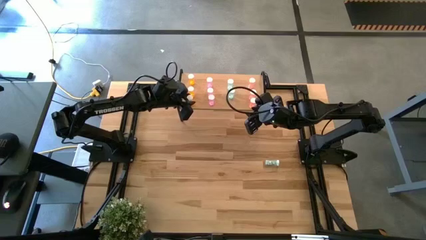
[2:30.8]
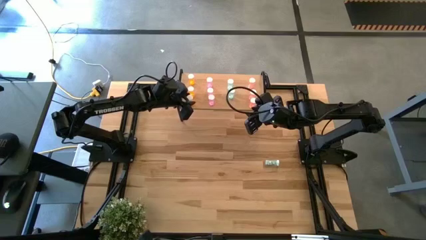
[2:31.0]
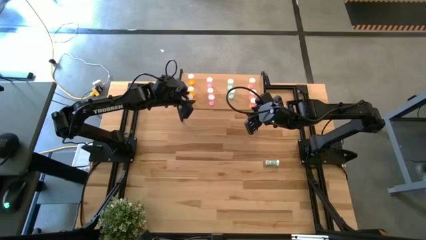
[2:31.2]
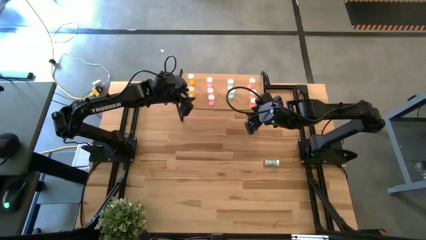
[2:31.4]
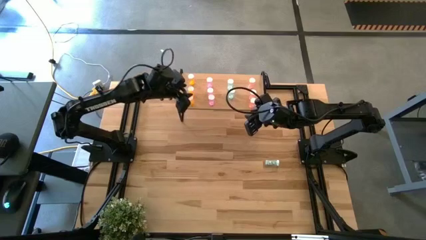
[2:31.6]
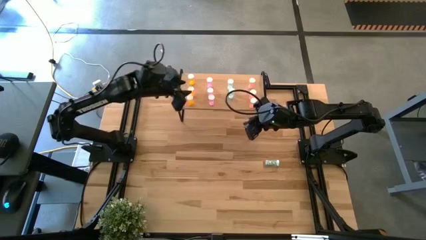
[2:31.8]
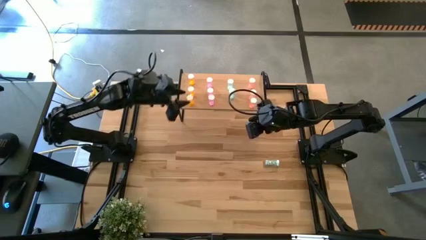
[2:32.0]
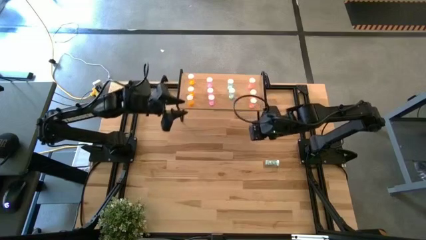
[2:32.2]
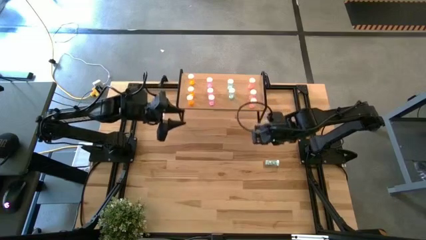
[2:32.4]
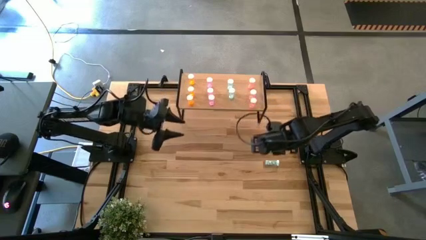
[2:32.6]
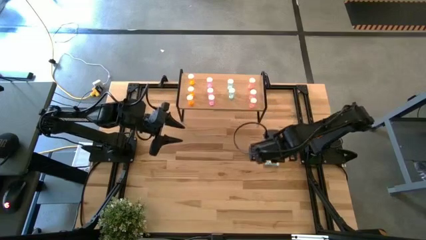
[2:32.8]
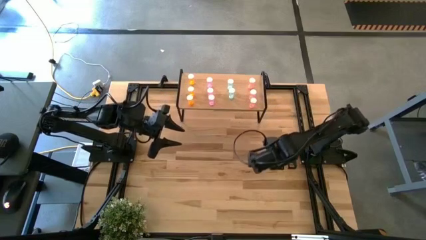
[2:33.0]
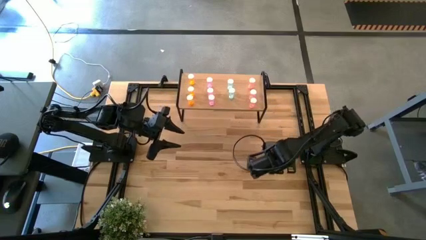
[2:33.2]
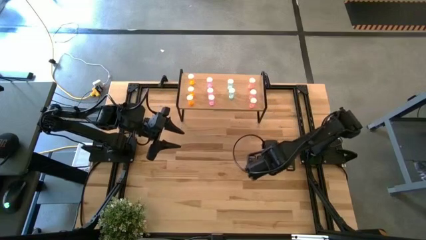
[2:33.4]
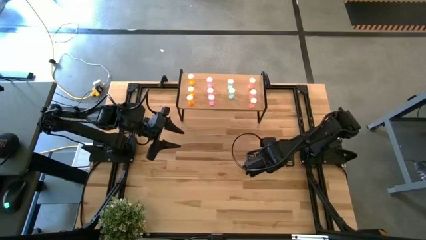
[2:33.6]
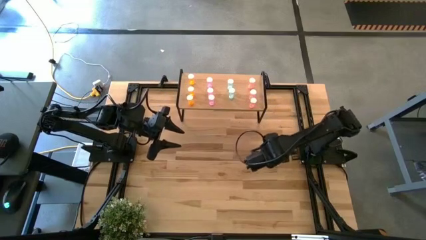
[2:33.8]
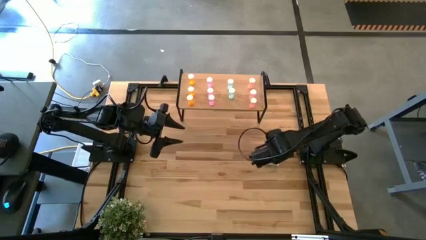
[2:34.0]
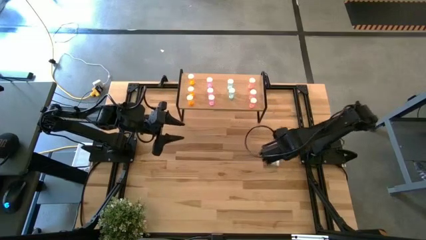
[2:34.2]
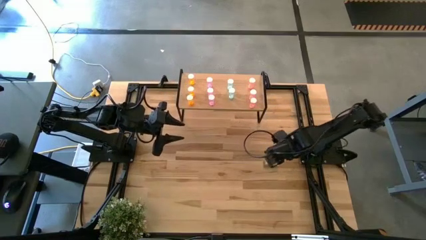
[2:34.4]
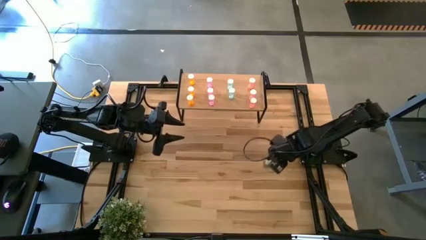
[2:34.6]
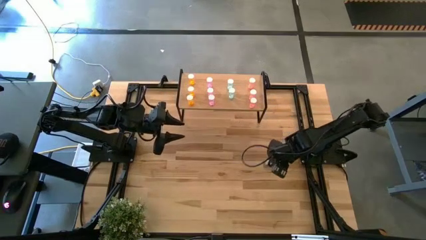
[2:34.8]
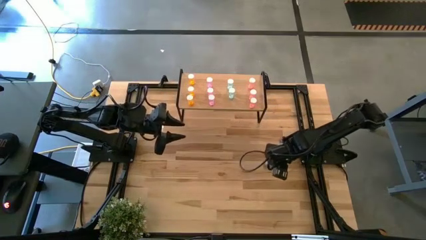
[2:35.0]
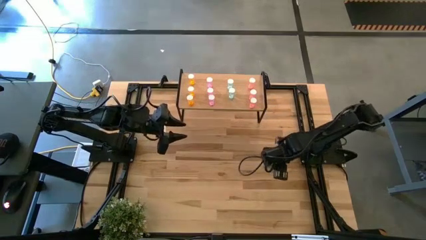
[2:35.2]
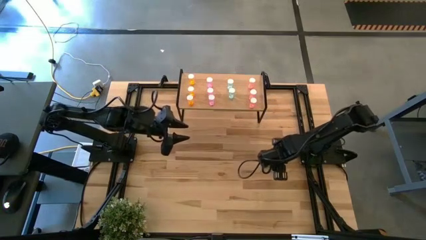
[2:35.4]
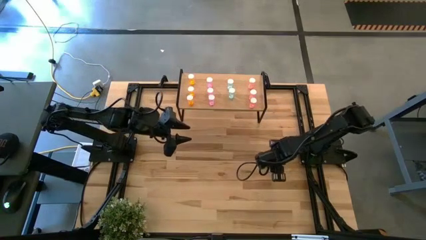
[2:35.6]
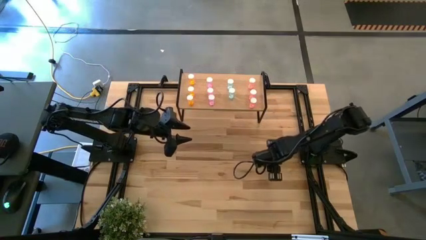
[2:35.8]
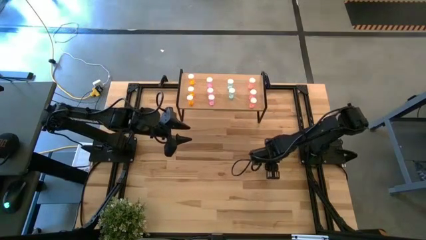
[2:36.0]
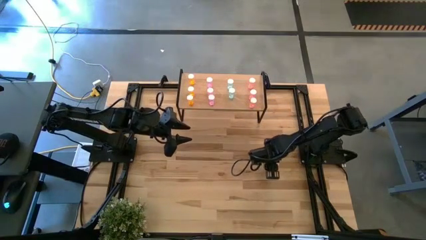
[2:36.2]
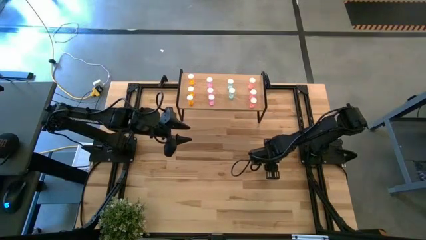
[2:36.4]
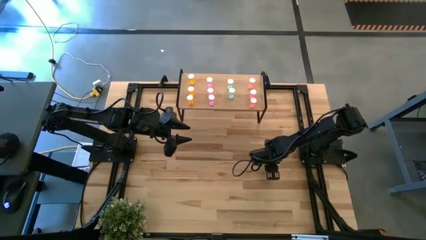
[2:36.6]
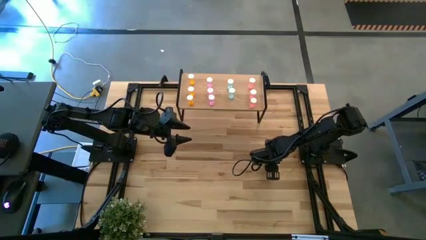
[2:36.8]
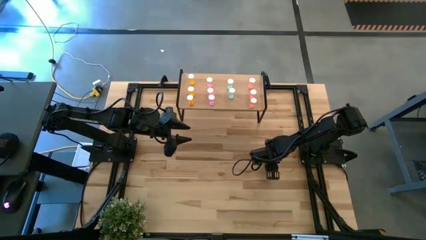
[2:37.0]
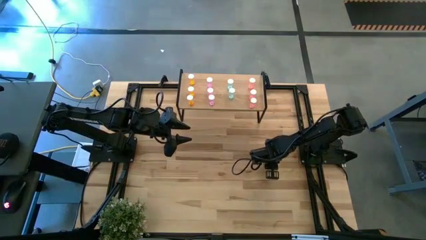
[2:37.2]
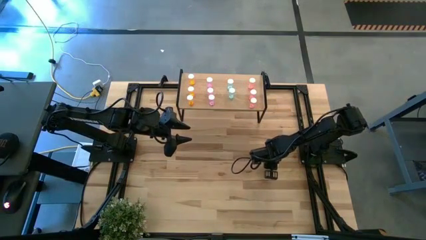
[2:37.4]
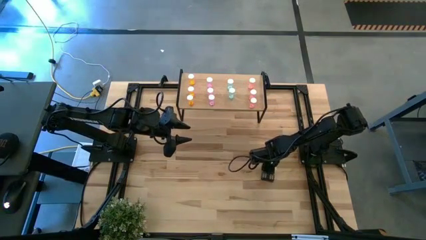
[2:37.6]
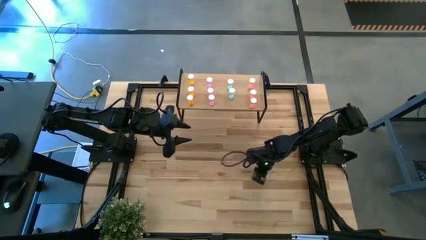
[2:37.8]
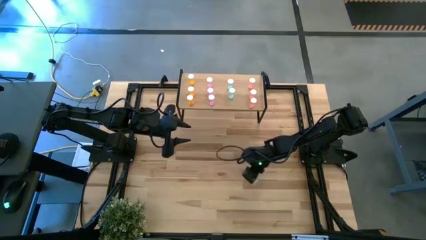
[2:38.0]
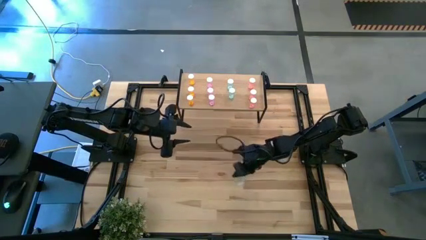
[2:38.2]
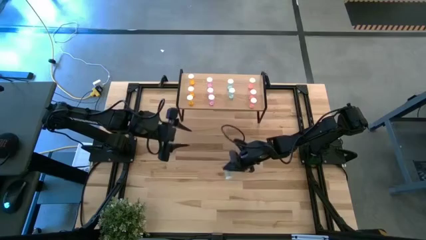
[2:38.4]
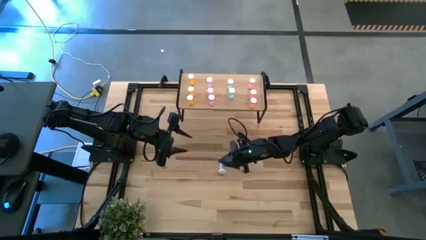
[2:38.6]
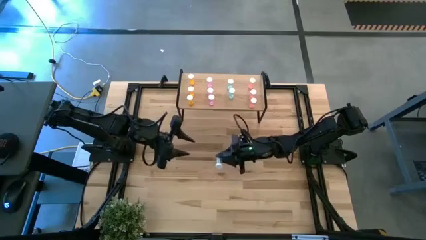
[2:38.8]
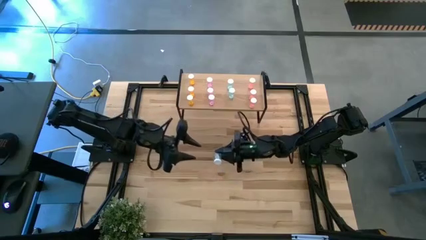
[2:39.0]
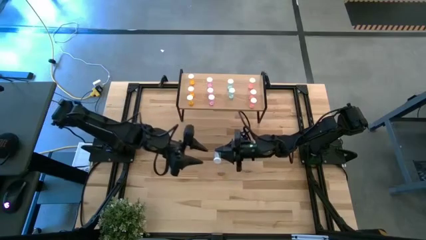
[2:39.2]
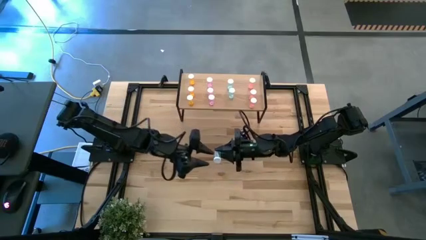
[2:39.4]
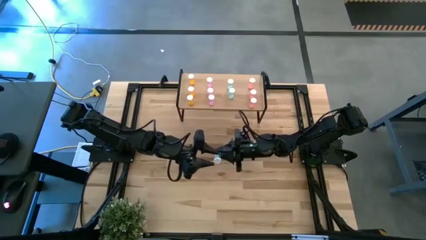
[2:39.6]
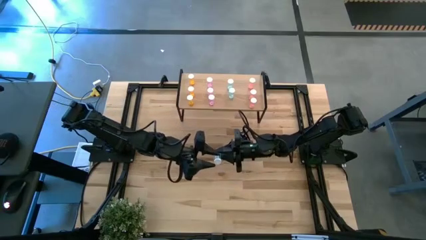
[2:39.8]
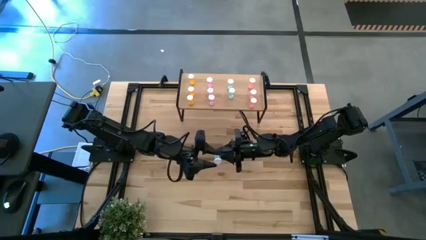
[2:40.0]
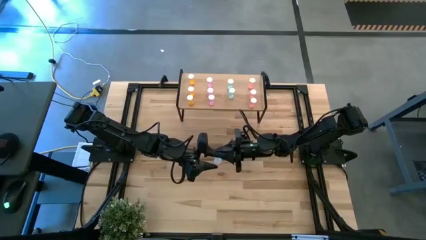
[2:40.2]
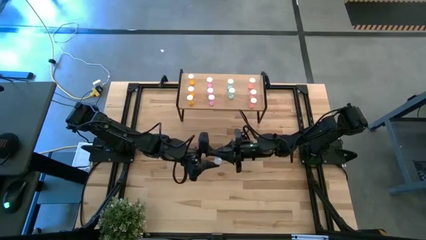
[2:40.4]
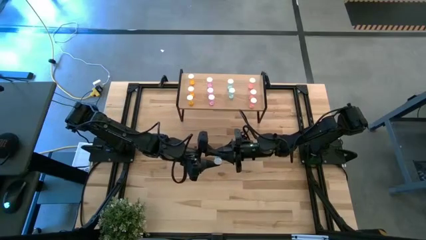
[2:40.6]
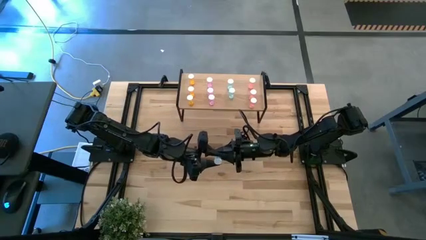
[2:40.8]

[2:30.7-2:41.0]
Task: Pick and place medicine bottles onto shelf by color
Put the blue medicine bottle on the shelf aligned with the other blue medicine bottles

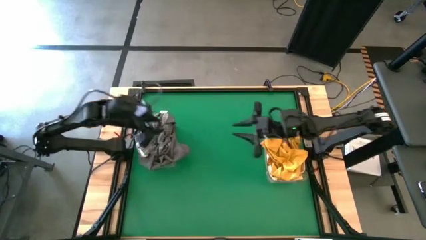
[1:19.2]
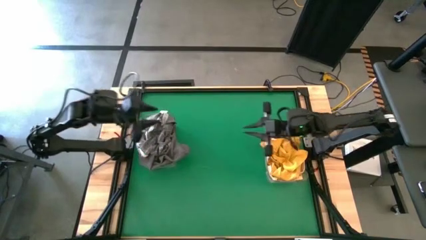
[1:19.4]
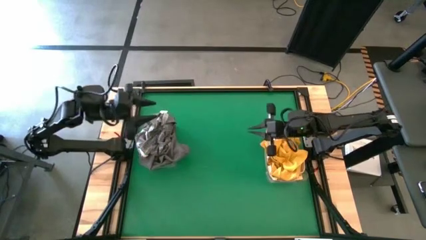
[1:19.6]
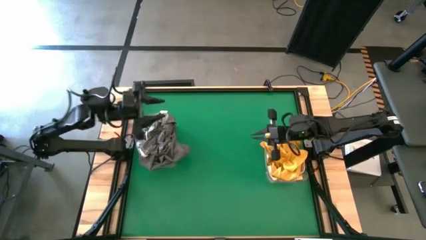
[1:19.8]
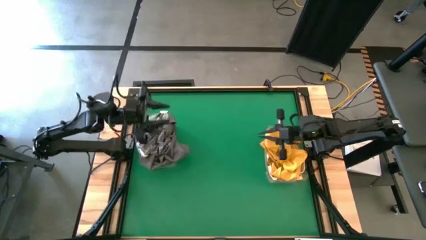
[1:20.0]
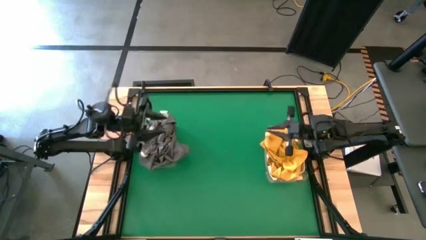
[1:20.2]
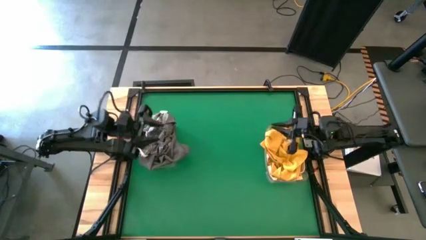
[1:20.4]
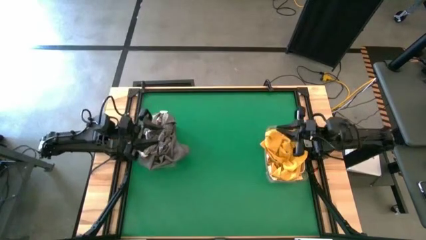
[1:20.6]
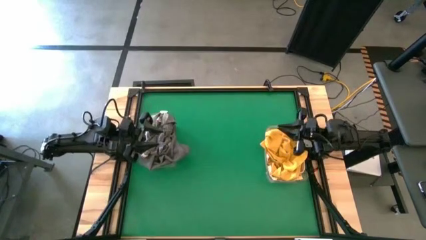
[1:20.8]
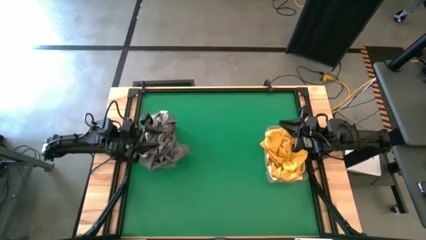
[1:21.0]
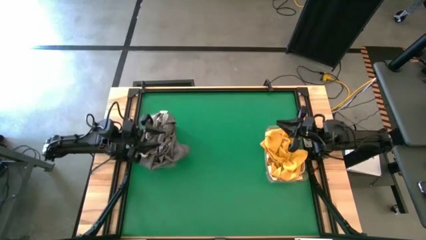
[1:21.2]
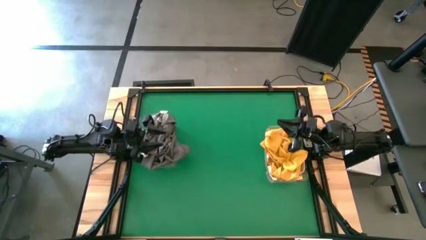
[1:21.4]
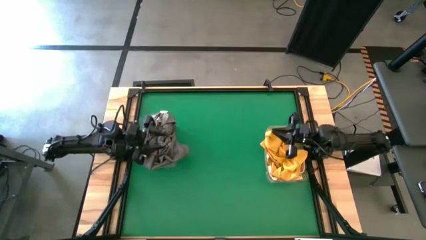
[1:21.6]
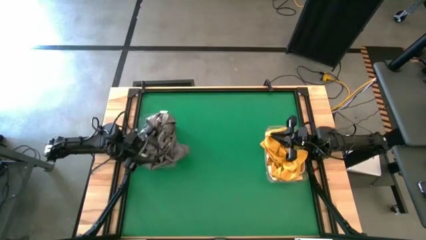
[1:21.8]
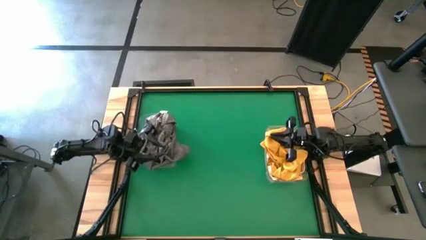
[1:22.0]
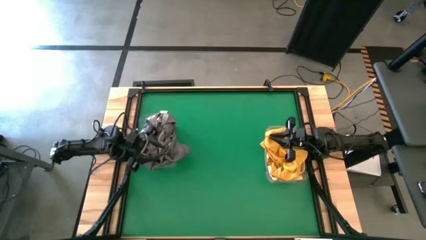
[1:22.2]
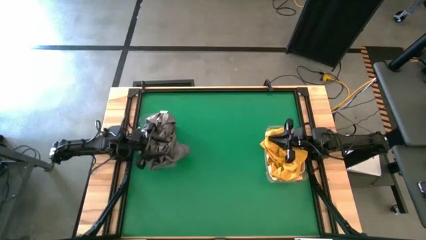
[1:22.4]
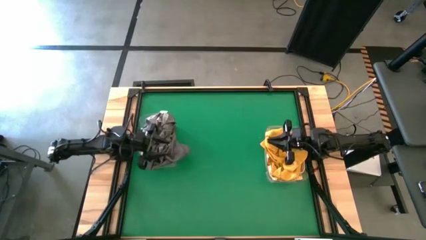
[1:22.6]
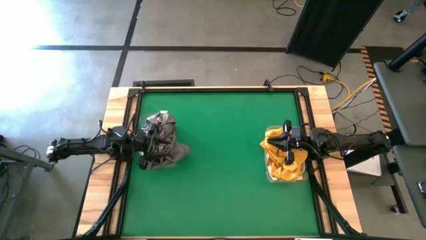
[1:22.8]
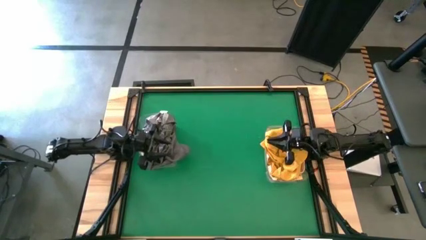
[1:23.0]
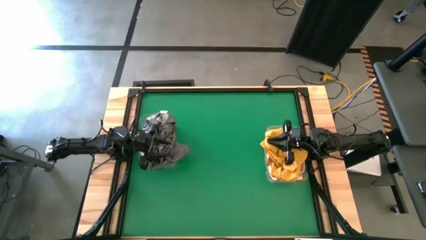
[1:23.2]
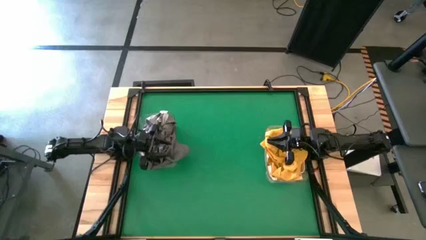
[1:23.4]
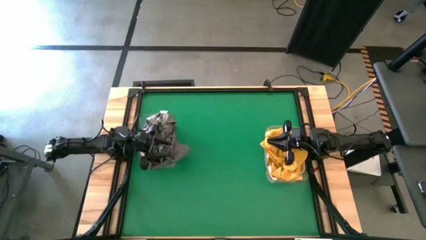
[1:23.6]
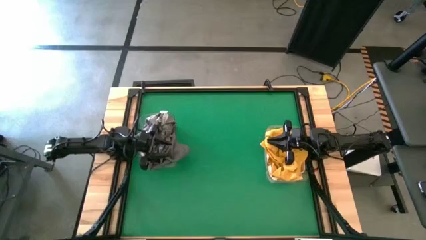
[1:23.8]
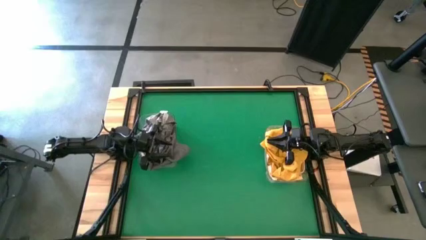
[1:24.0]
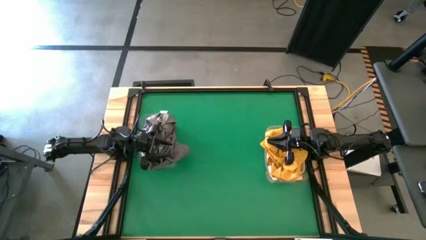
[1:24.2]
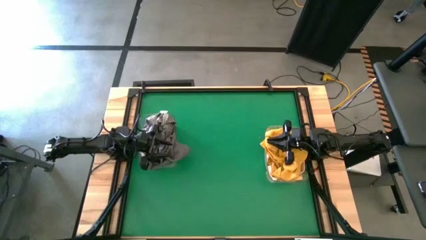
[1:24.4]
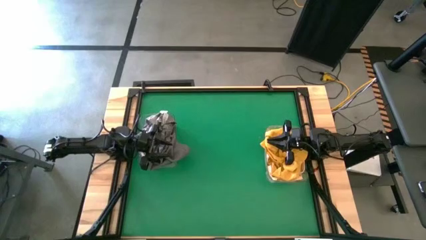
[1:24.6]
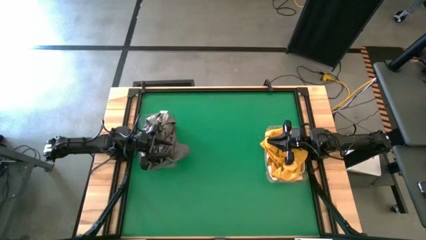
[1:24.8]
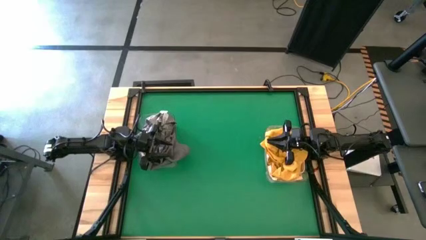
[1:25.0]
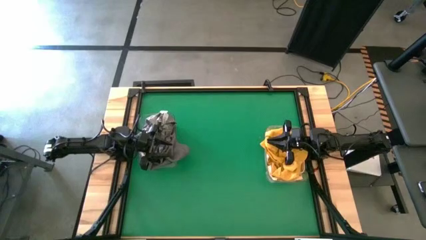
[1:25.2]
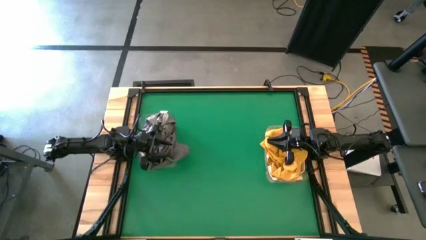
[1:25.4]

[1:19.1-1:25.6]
Task: Sort microfiber towel by color & place in baskets
Return to Home Position
